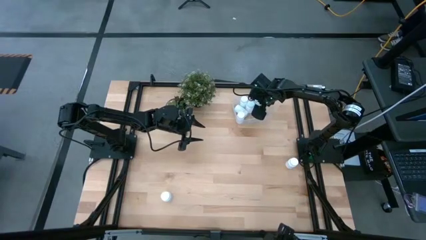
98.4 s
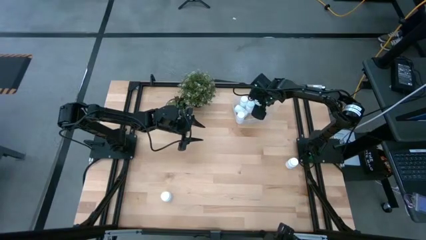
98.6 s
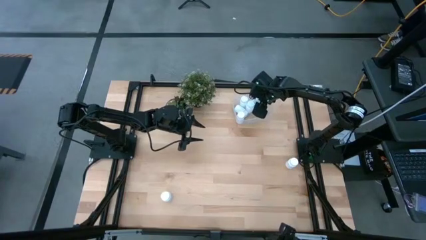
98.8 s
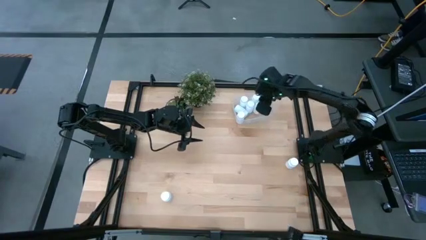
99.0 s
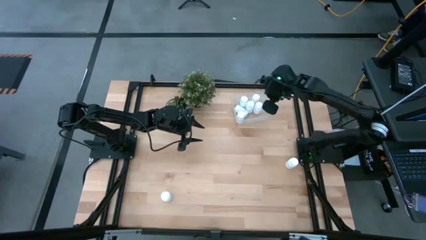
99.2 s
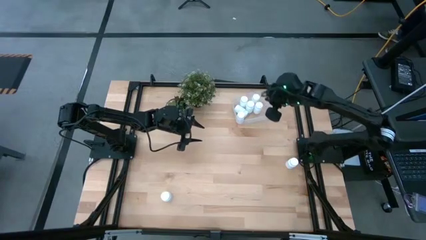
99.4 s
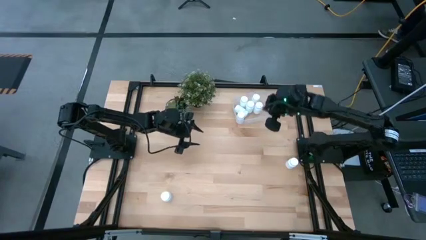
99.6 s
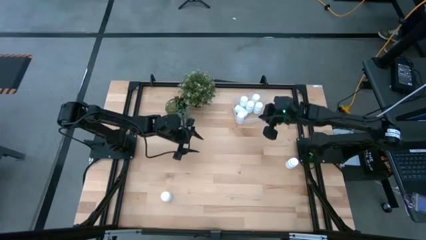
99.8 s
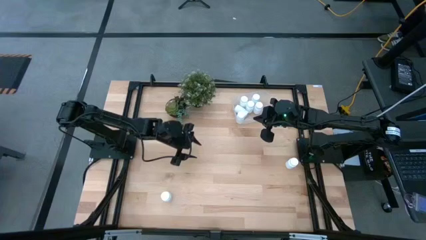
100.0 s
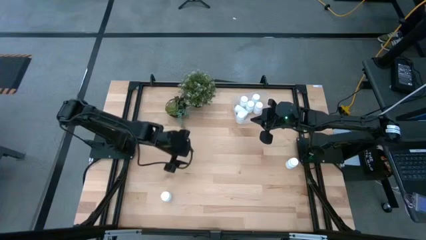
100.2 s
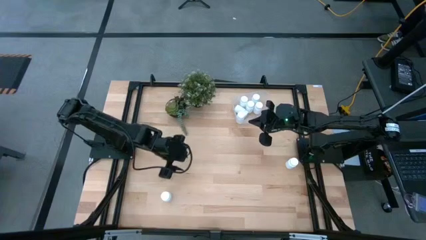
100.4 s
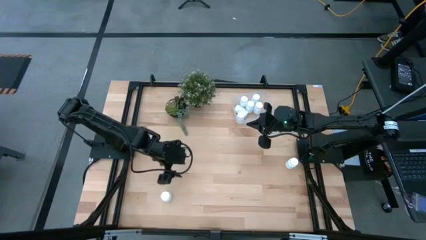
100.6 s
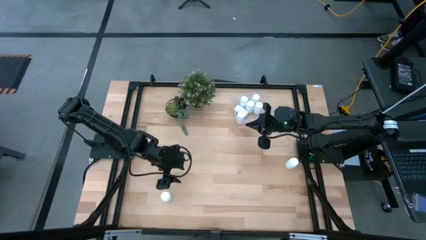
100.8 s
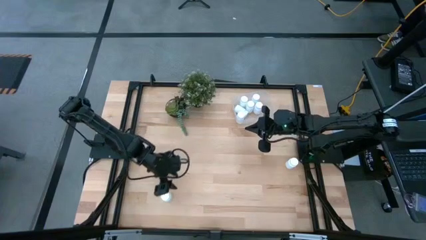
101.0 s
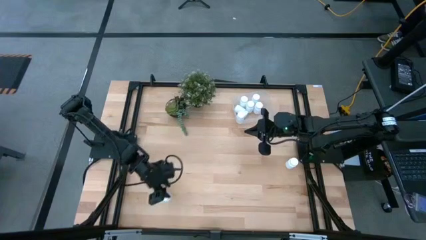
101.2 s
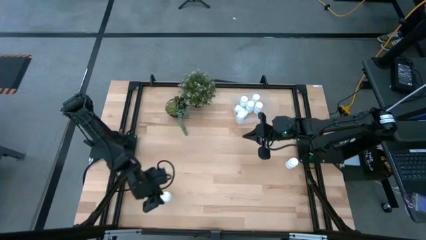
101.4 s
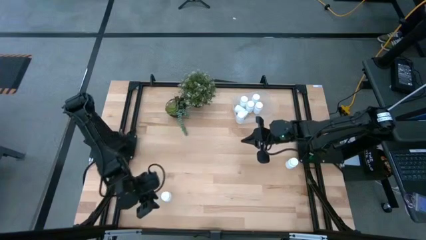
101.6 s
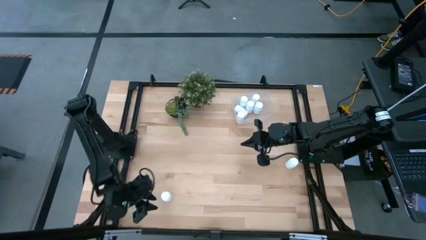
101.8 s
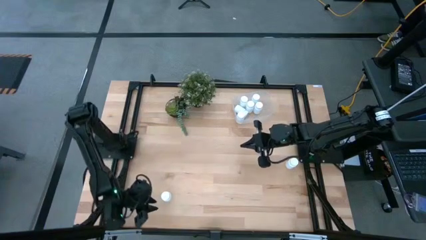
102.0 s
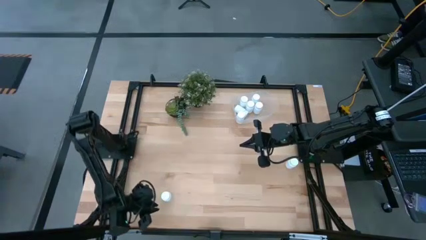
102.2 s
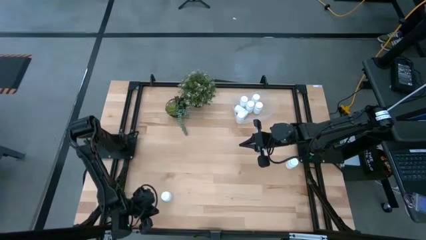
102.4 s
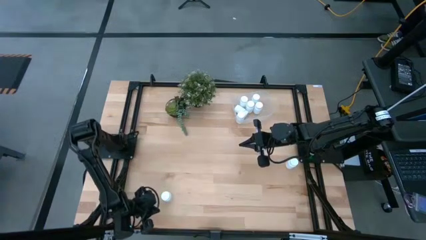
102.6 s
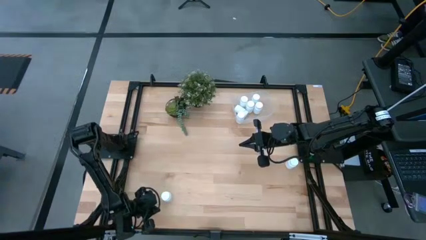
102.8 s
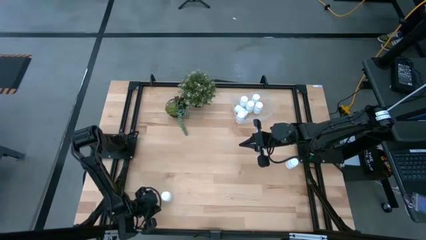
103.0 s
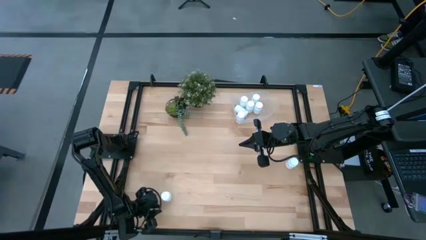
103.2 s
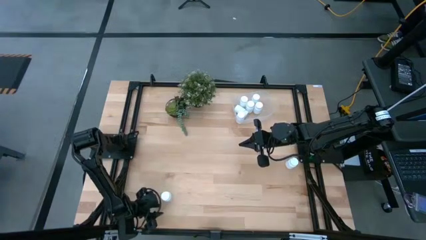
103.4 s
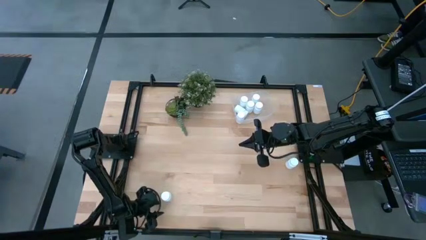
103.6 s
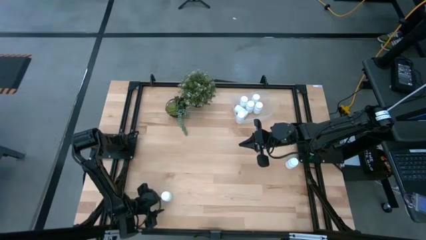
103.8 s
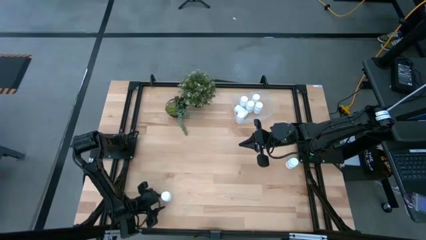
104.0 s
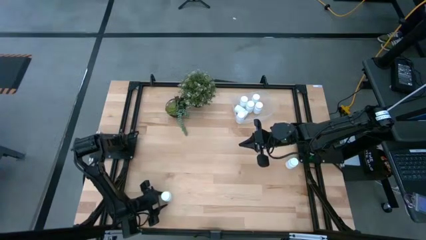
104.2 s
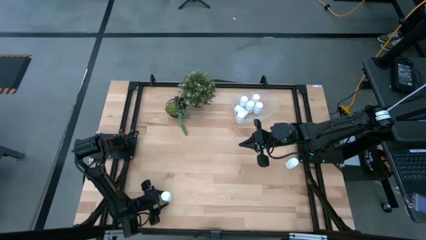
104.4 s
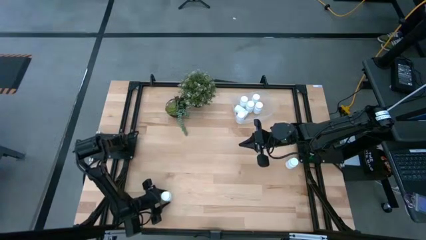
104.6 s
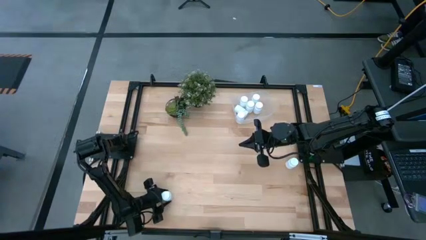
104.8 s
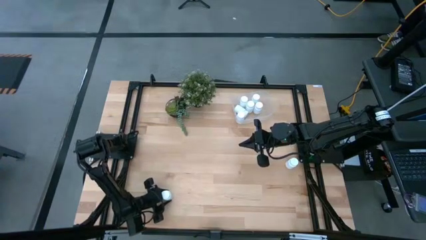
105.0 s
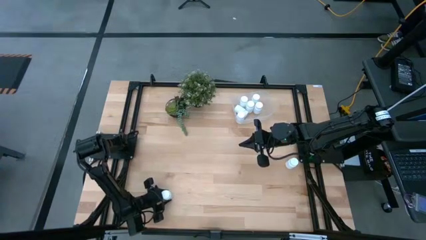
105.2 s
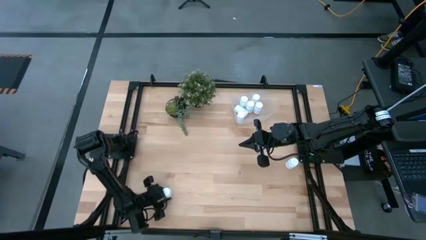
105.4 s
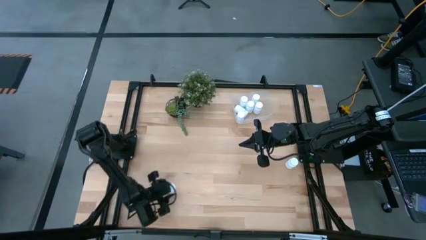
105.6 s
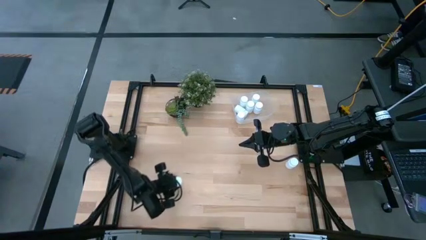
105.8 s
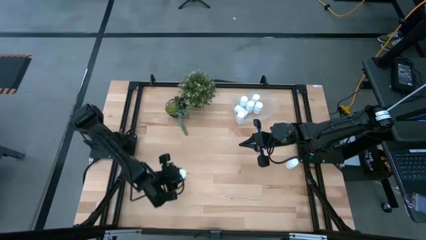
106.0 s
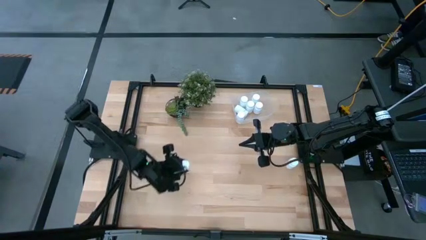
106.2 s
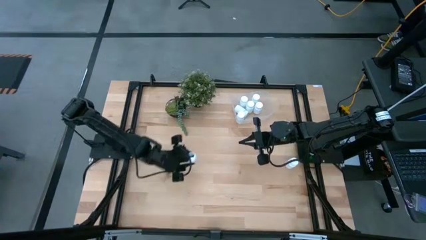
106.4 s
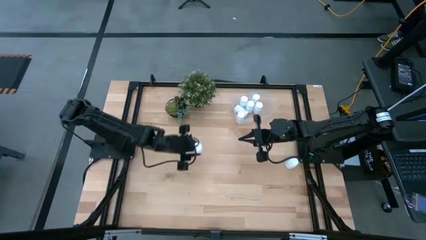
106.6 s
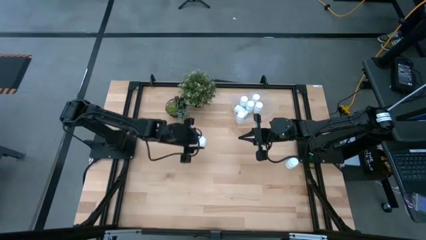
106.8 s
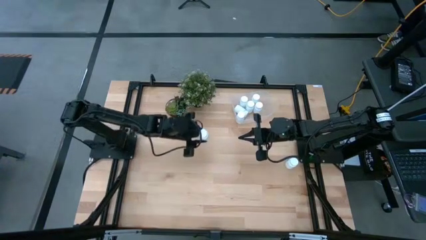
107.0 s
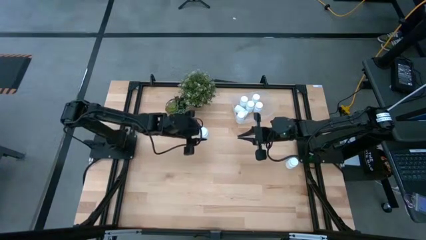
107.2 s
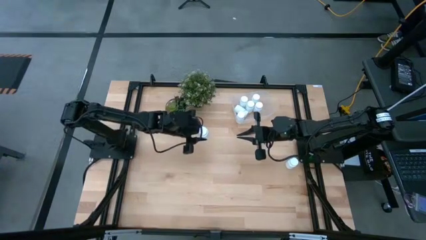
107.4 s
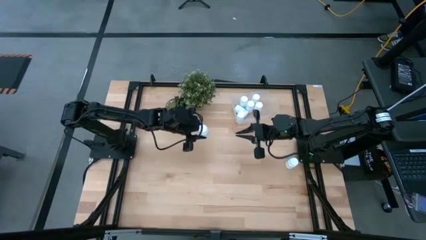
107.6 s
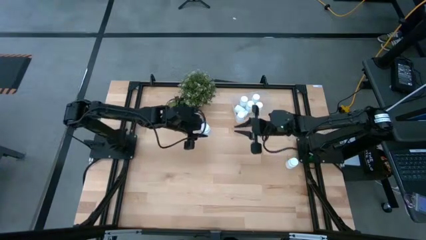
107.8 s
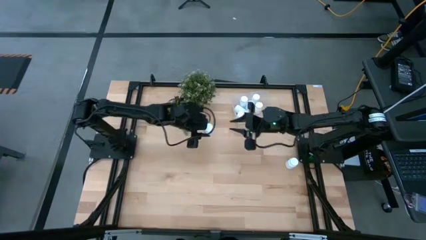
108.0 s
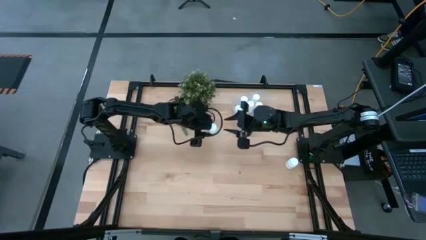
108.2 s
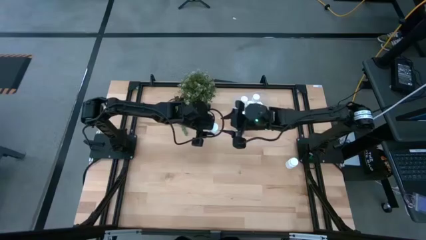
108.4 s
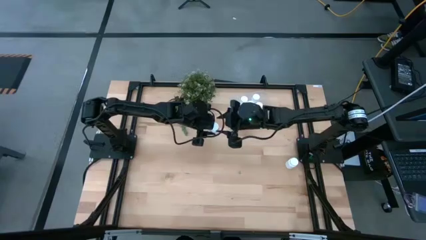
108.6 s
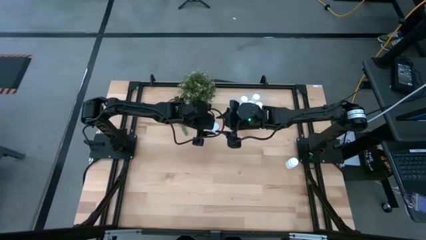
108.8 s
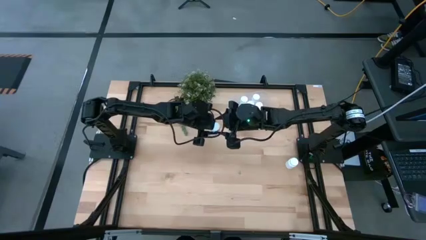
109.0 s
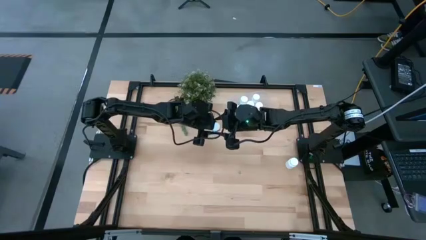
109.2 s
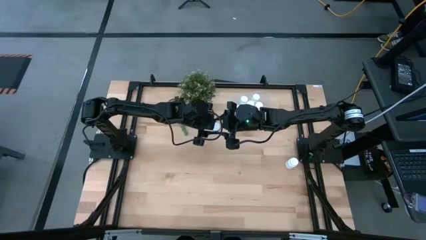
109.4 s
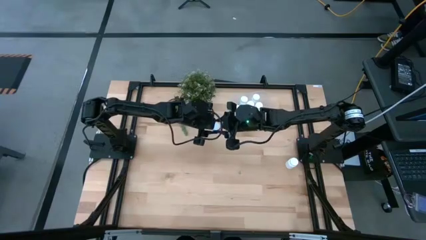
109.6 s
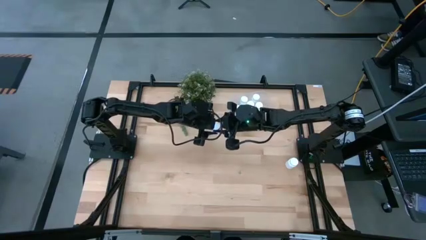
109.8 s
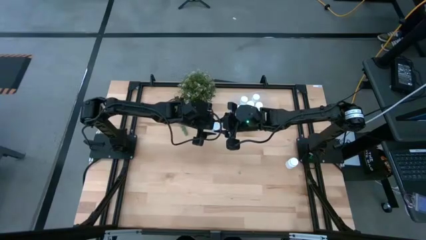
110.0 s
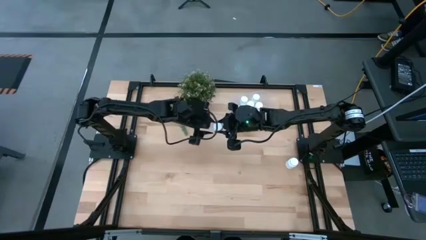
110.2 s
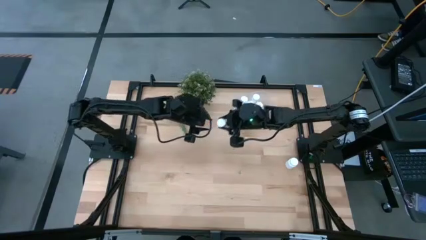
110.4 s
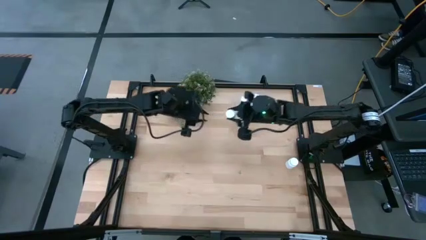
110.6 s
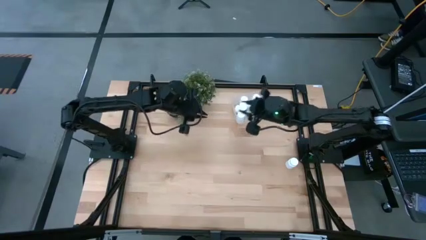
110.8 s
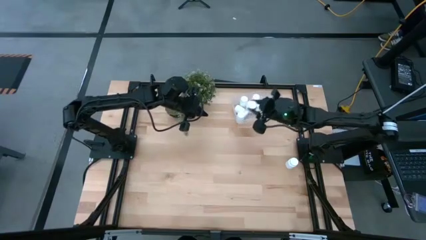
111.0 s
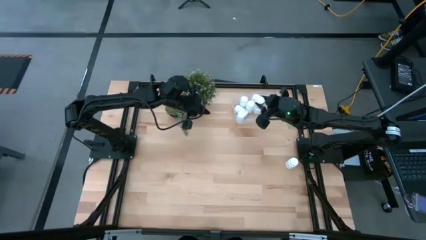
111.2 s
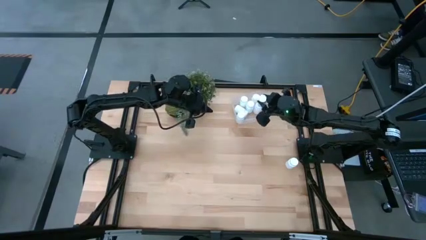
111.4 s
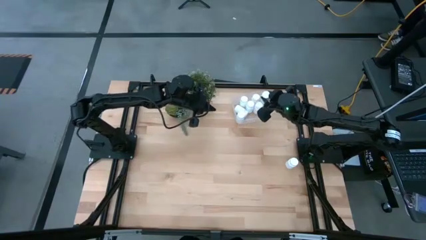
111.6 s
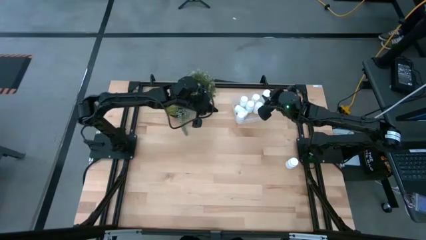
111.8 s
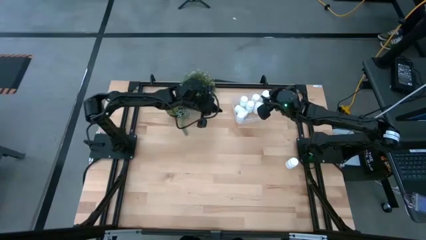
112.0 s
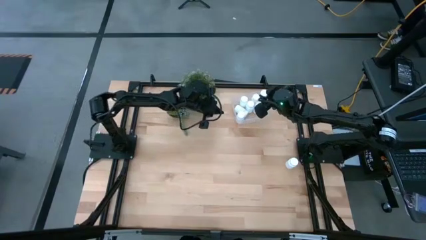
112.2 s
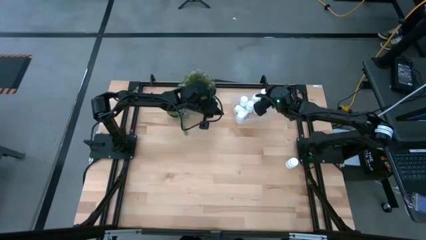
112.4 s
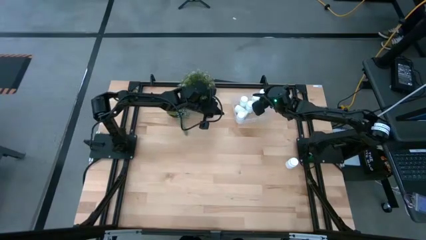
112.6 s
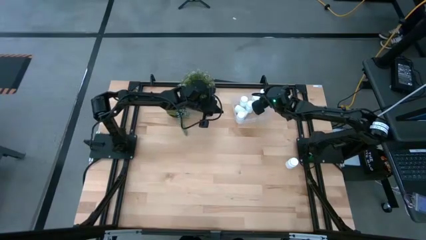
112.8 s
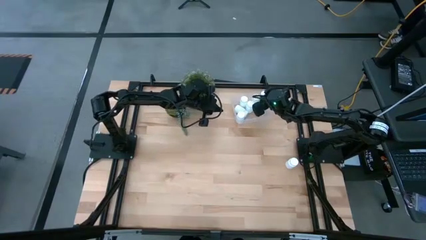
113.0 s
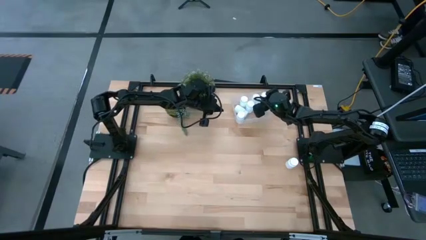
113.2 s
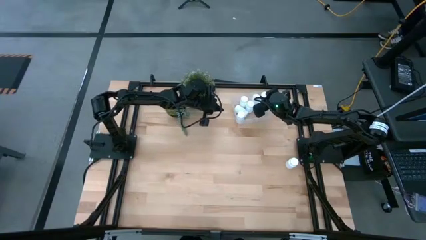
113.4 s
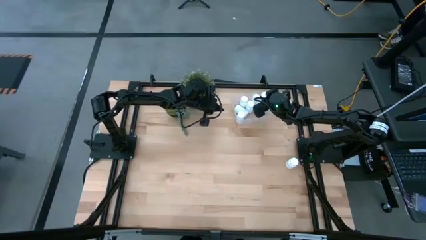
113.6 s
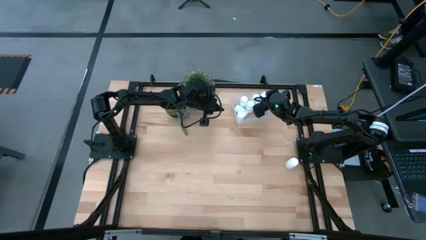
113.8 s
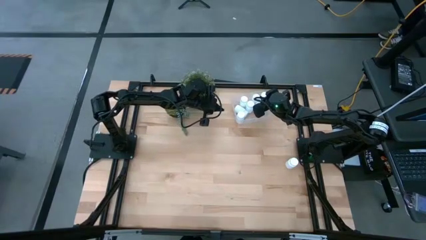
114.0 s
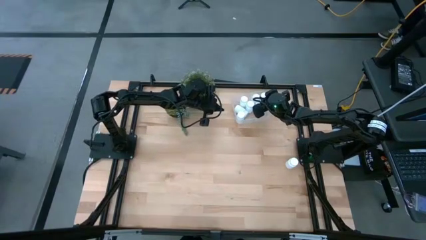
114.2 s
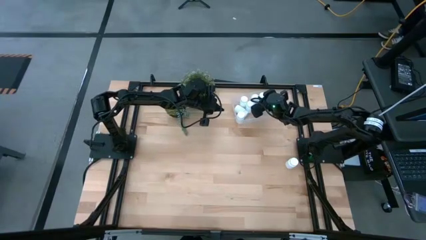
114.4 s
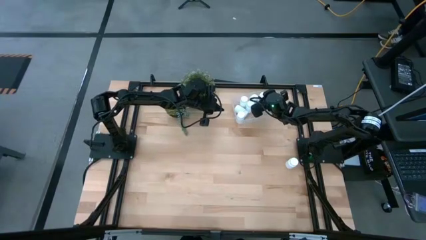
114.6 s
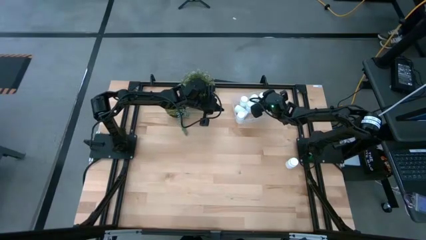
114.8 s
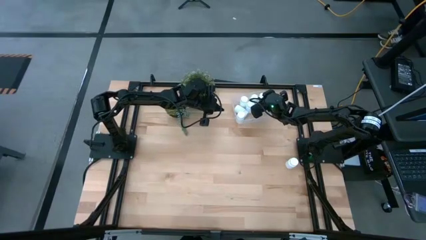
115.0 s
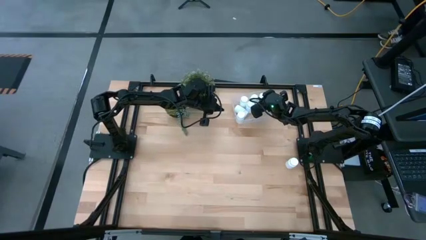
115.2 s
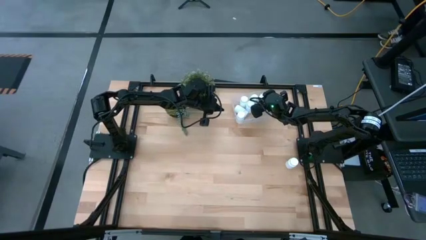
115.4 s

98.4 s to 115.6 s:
Task: Pick and place pill bottles into a basket
Put the white pill bottle into the transparent bin
